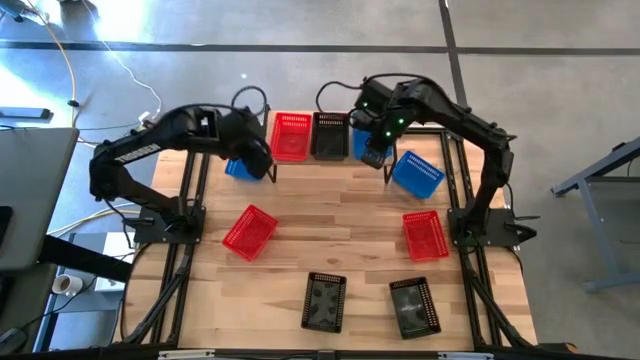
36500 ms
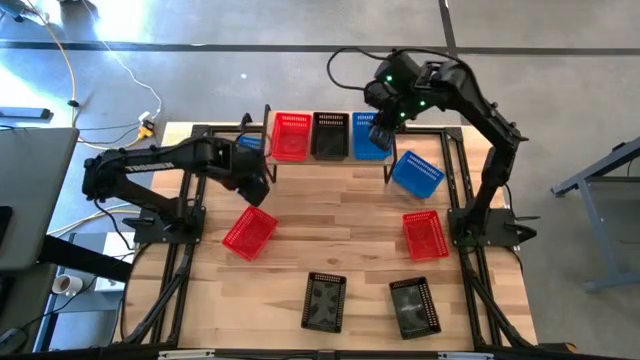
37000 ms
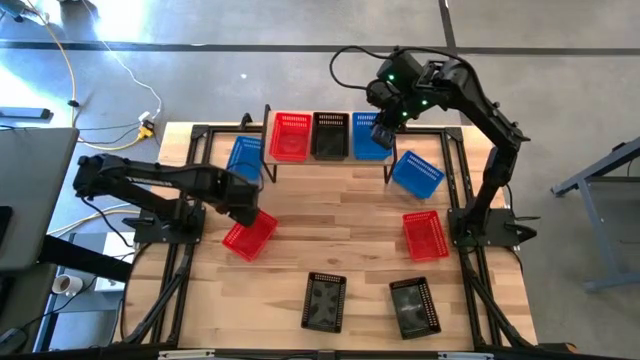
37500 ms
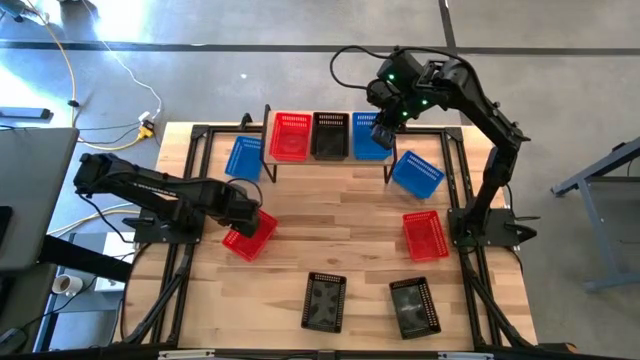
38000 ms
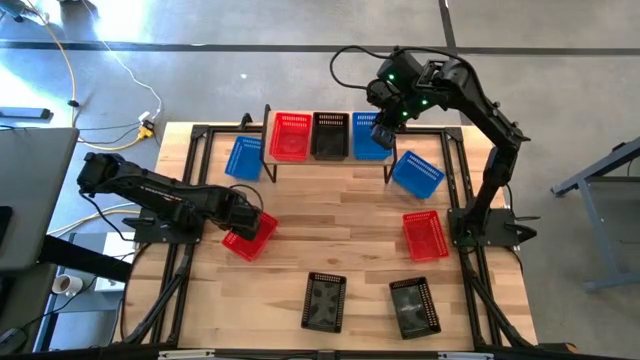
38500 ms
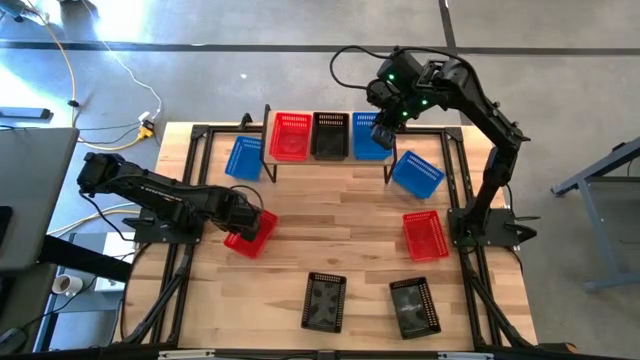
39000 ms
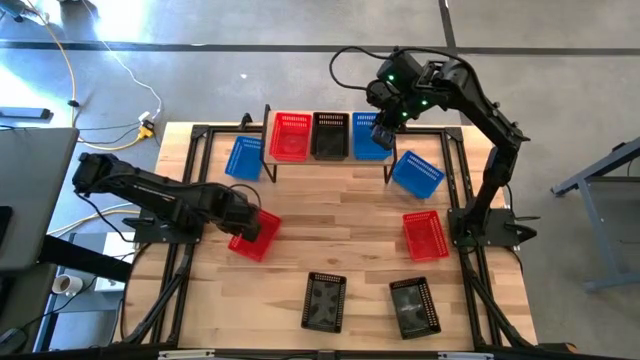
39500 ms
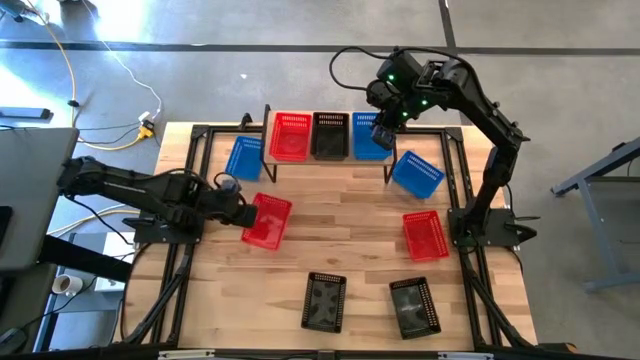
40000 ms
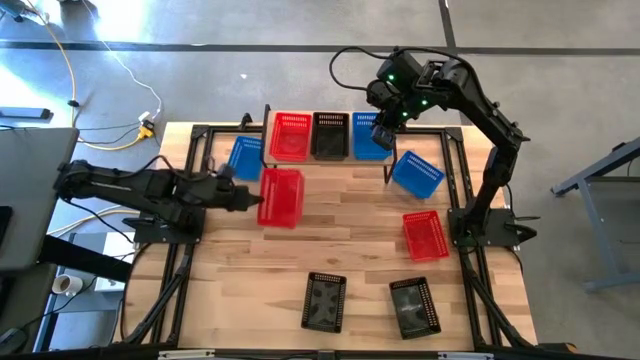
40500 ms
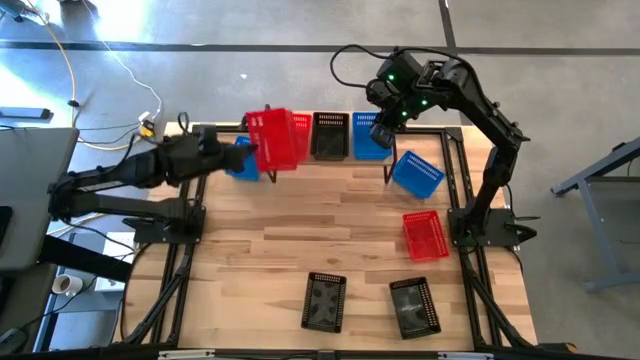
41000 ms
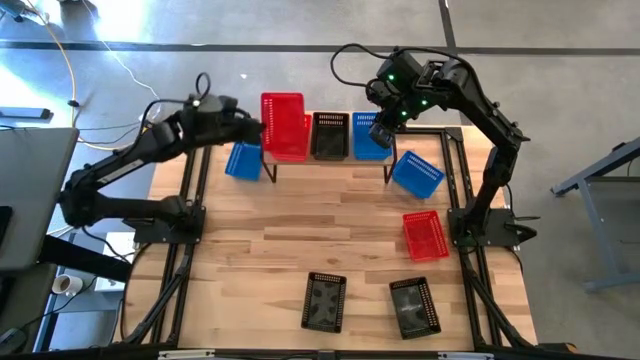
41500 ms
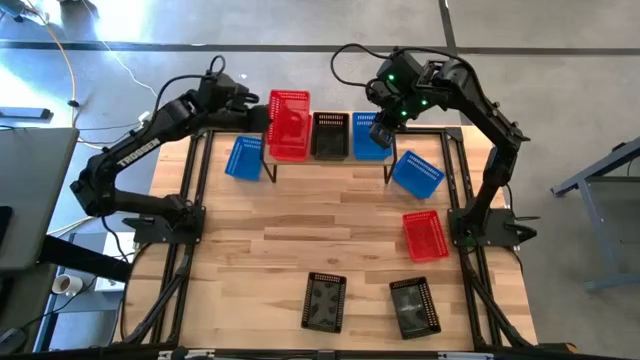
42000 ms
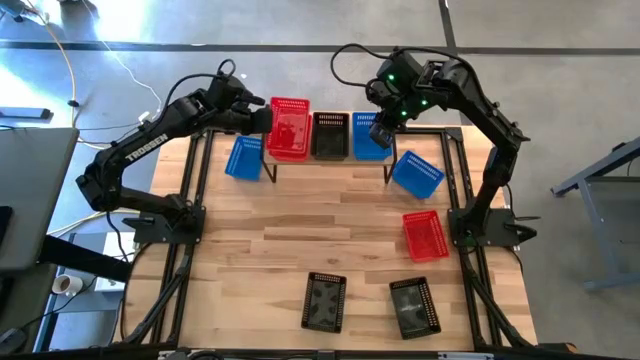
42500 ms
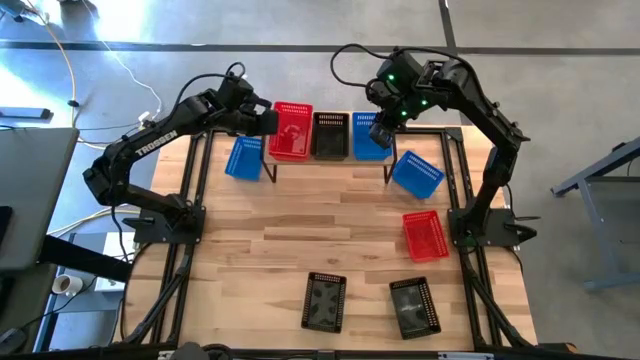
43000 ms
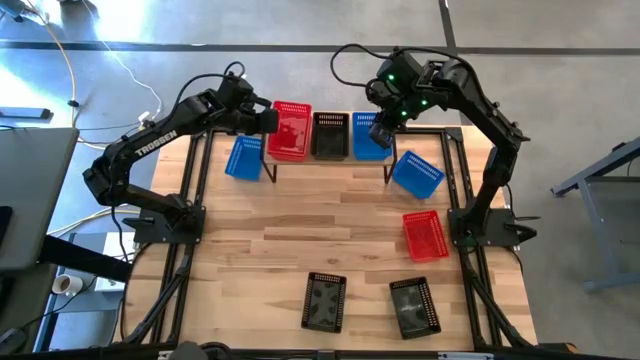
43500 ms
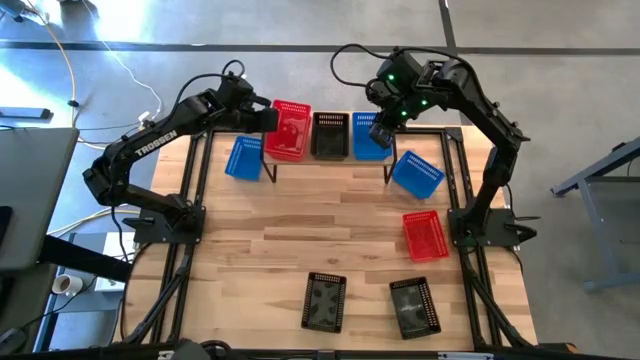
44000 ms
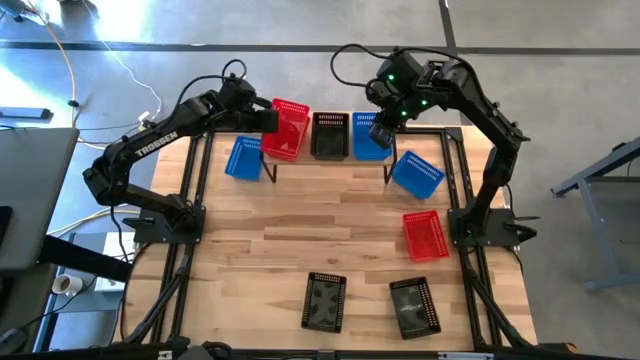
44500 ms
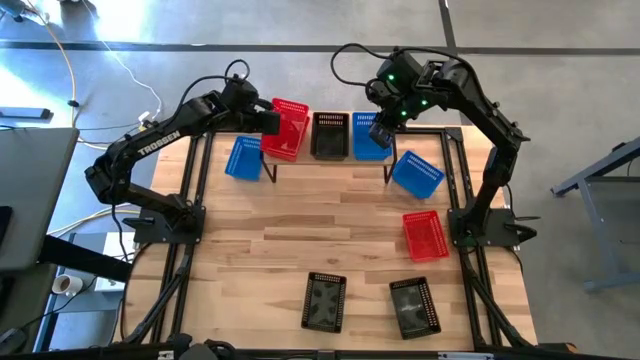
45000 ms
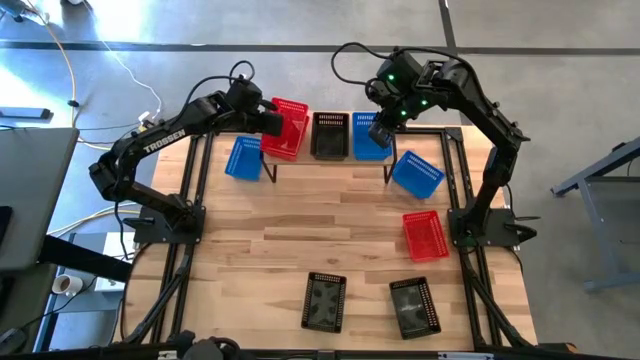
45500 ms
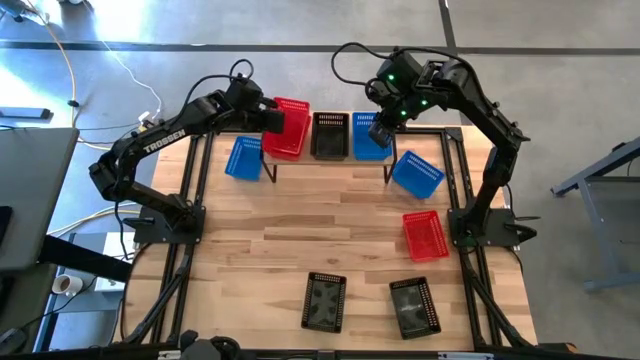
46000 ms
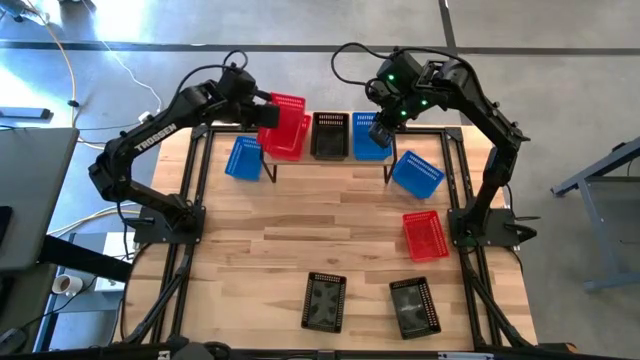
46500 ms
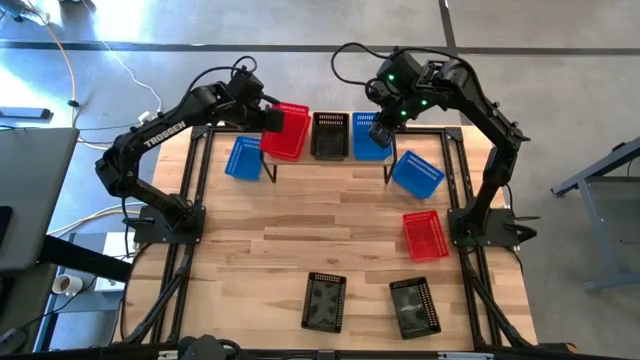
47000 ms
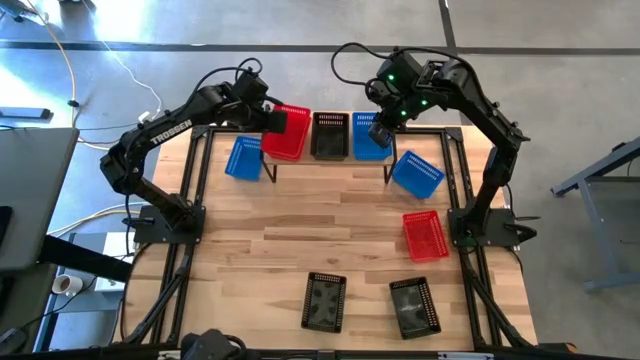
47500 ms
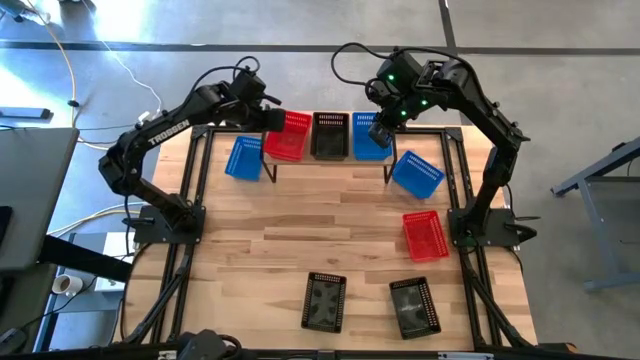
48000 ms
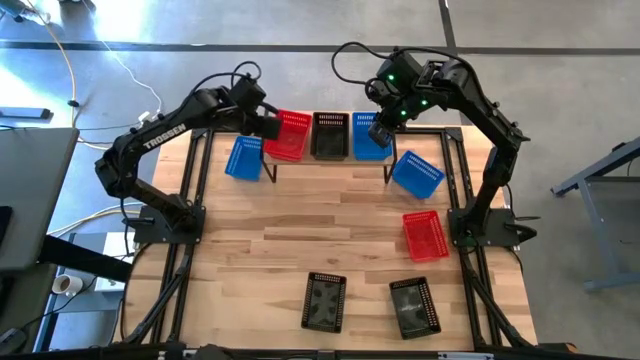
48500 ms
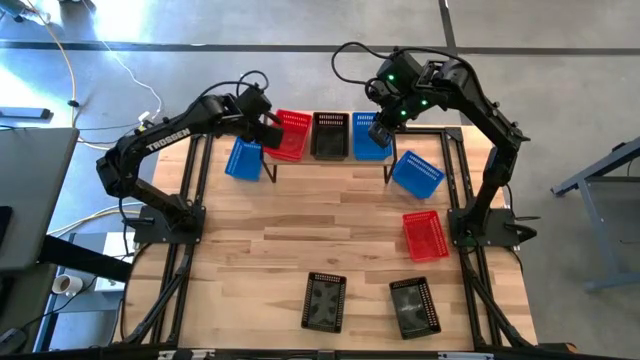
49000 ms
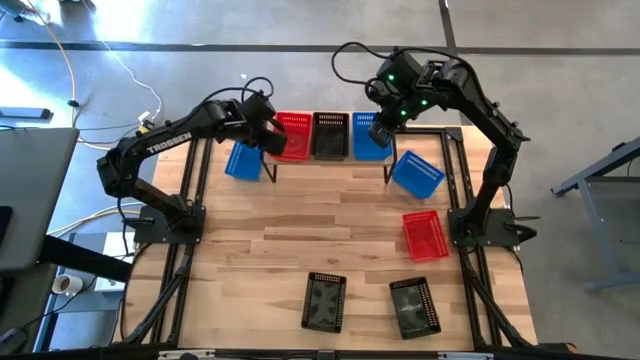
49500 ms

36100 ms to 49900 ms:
Task: Stack baskets on shelf by color
Stack the left red bin on top of the red bin on the shelf

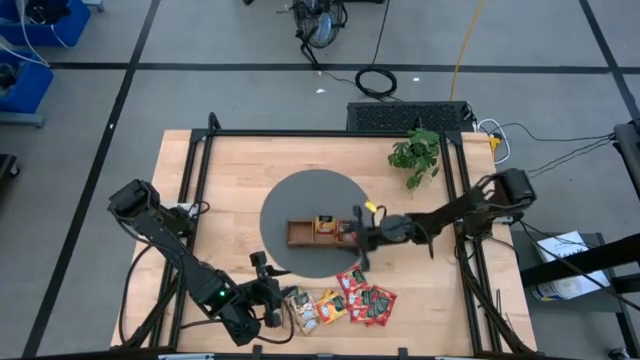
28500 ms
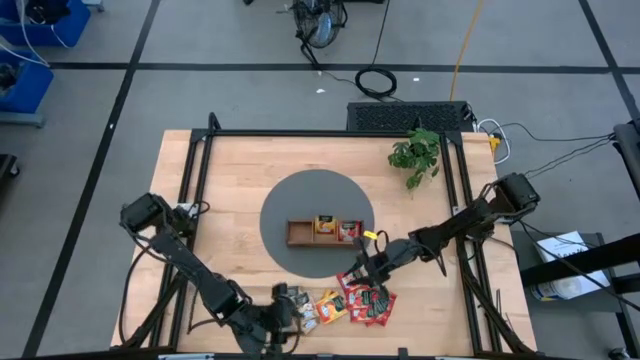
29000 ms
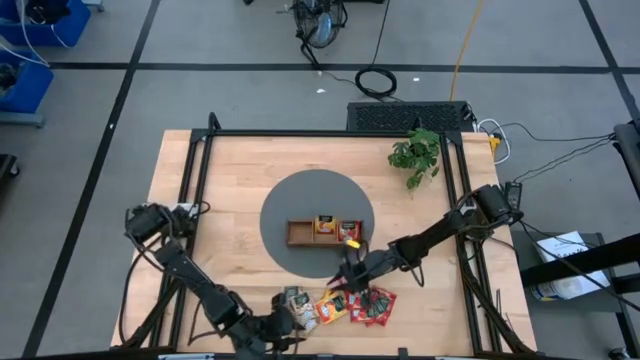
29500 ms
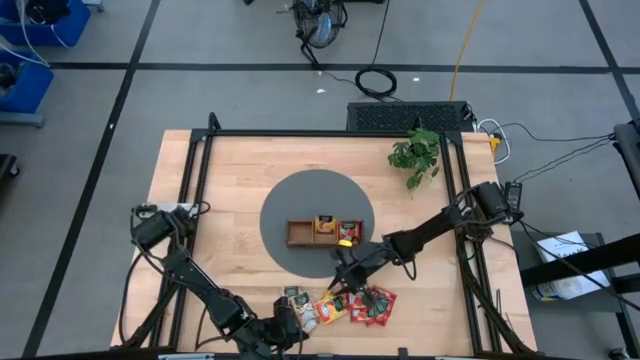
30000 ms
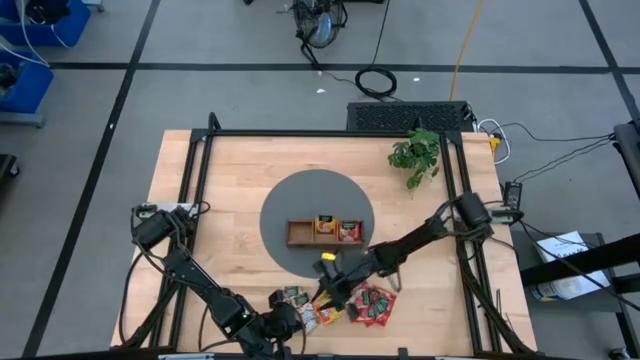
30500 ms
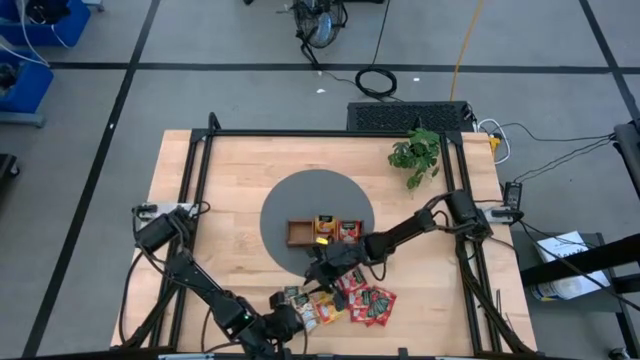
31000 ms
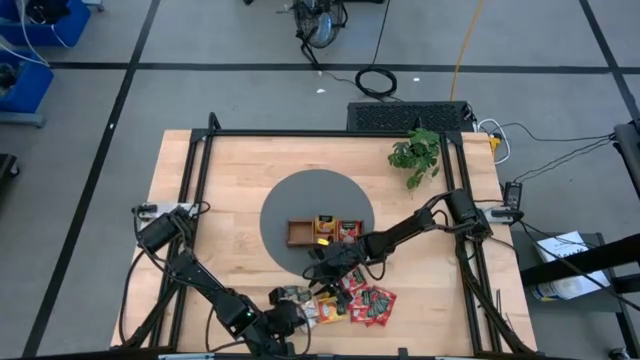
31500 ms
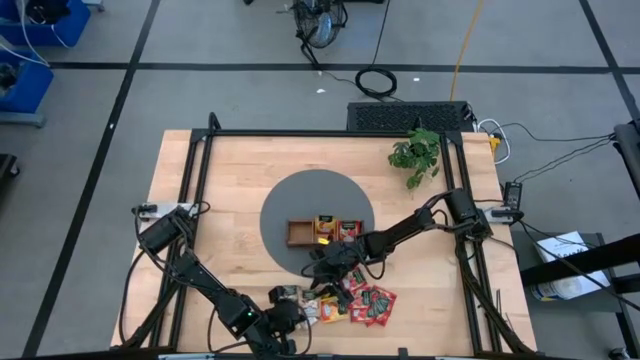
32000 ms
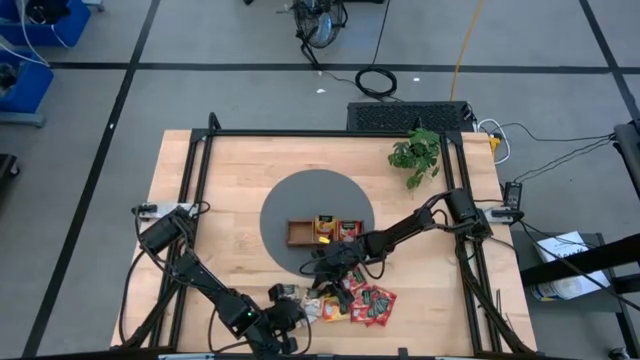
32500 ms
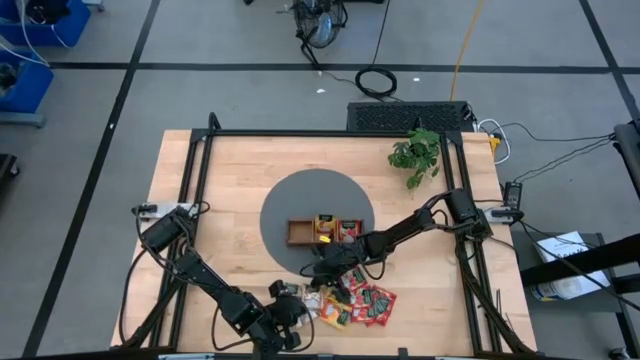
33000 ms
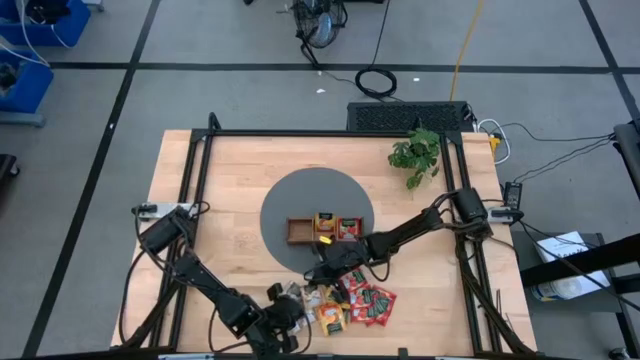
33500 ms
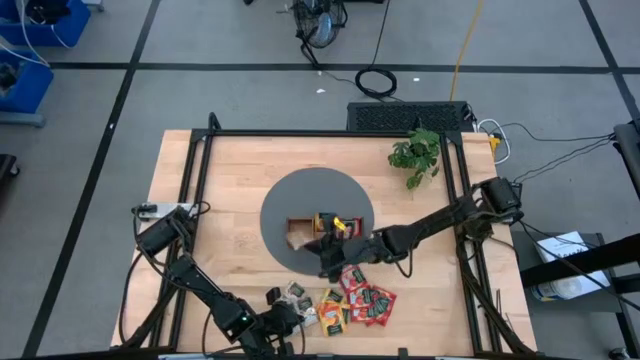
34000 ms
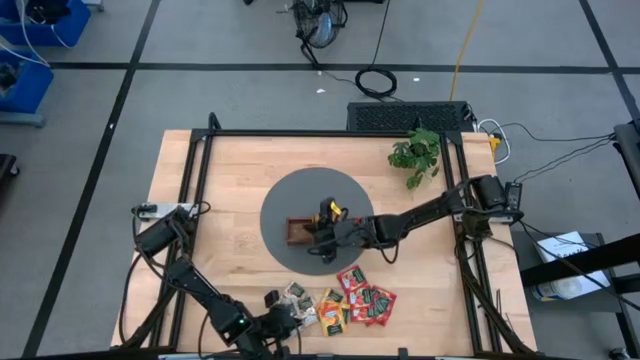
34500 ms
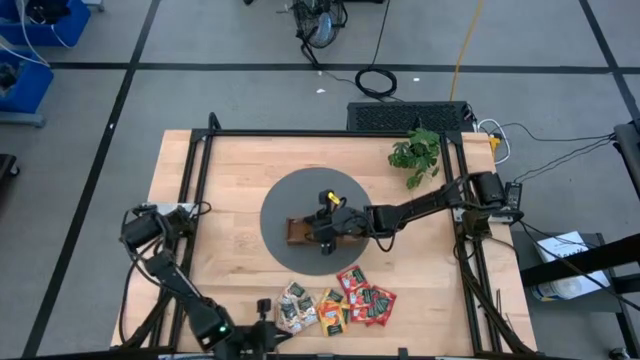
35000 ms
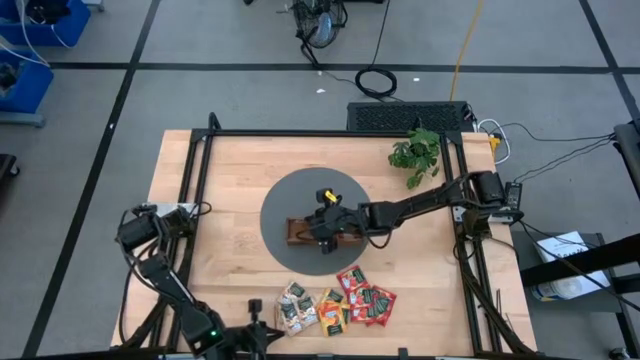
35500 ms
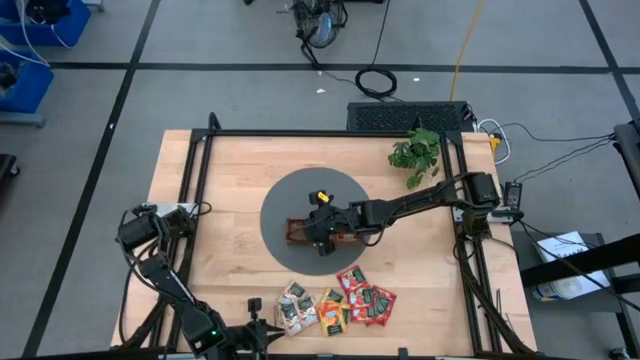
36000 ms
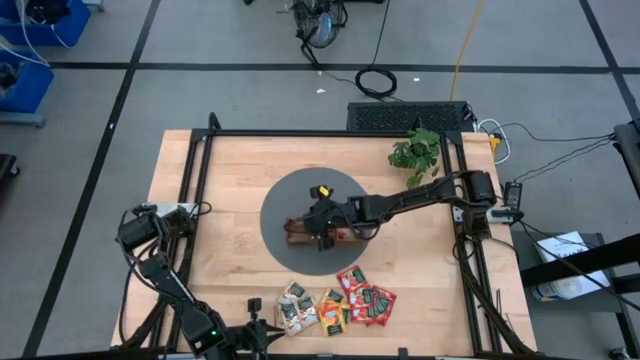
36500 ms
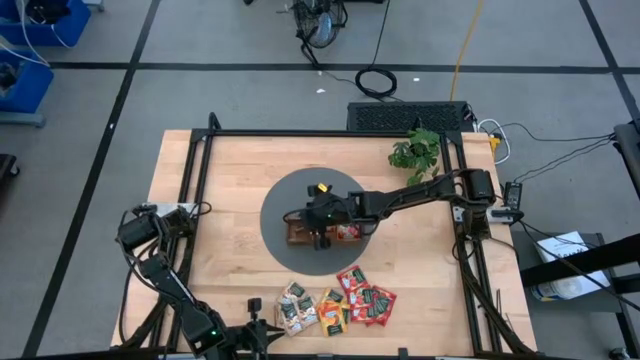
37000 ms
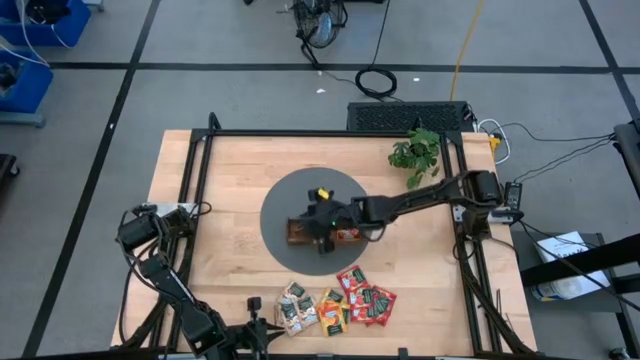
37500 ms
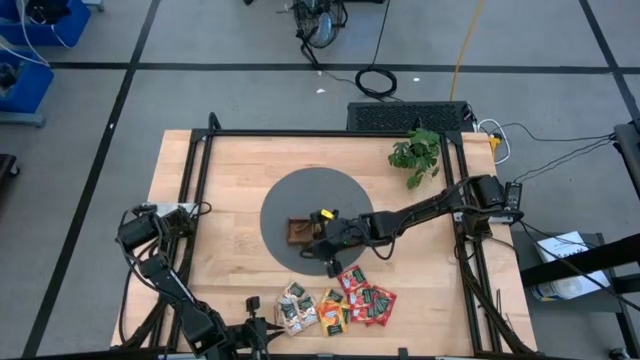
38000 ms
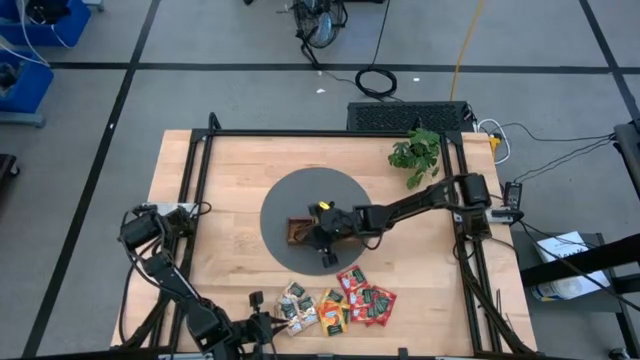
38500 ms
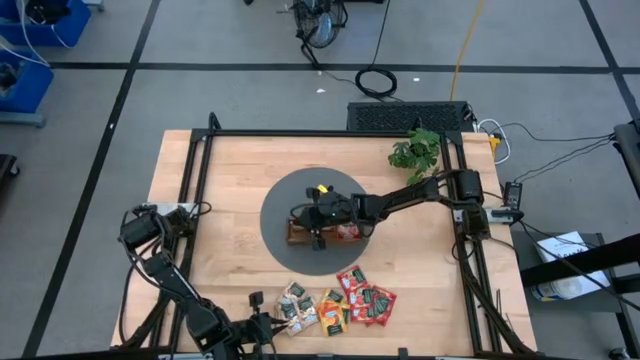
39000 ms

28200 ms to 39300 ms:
Task: Pick & Place Tea
Put the cinnamon tea sachet into the left compartment of the wooden organizer
